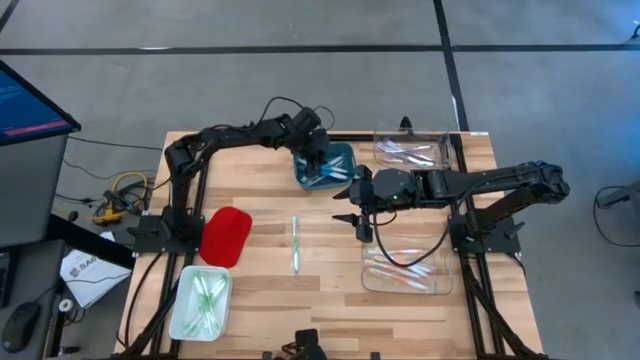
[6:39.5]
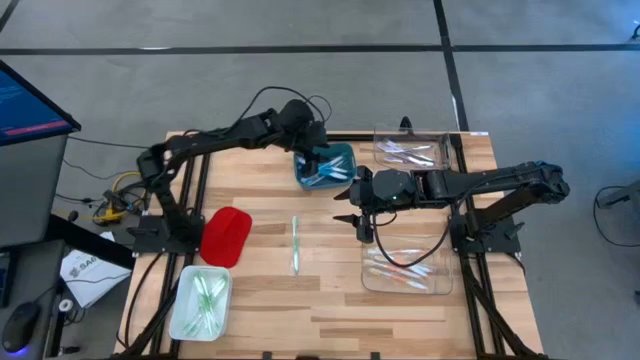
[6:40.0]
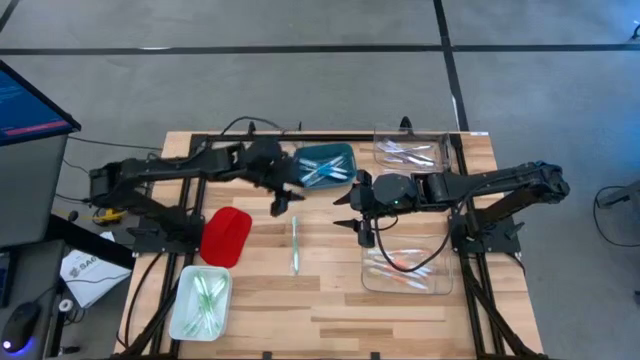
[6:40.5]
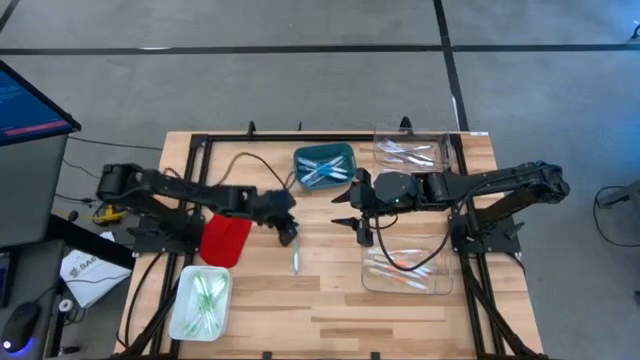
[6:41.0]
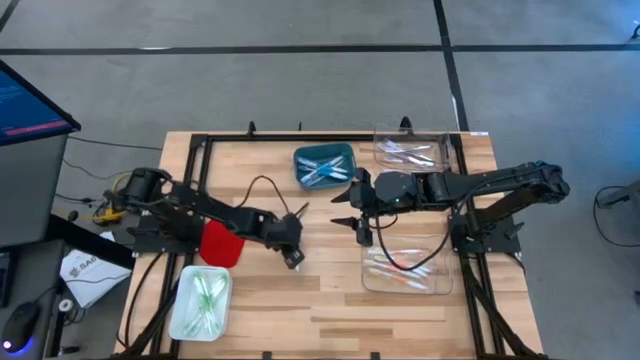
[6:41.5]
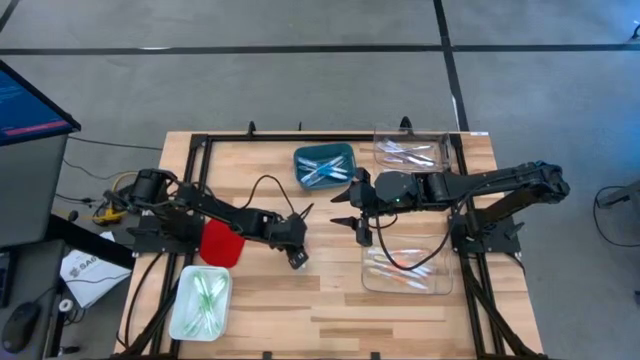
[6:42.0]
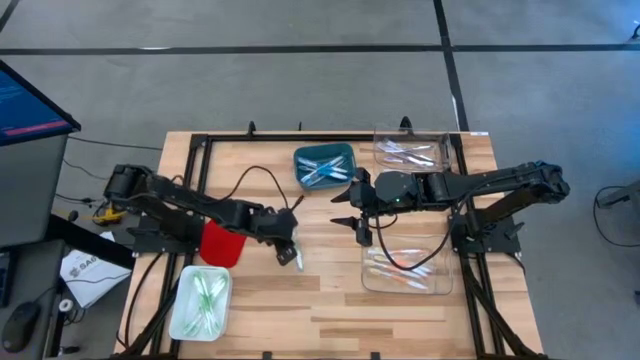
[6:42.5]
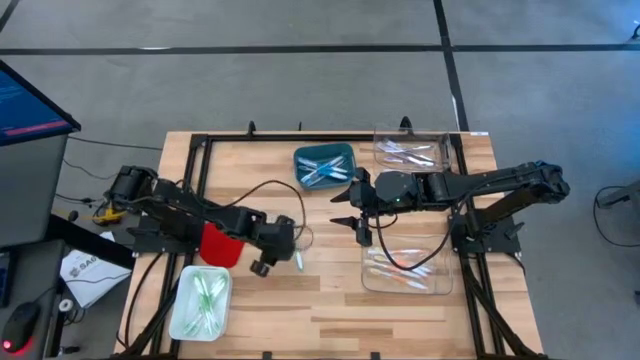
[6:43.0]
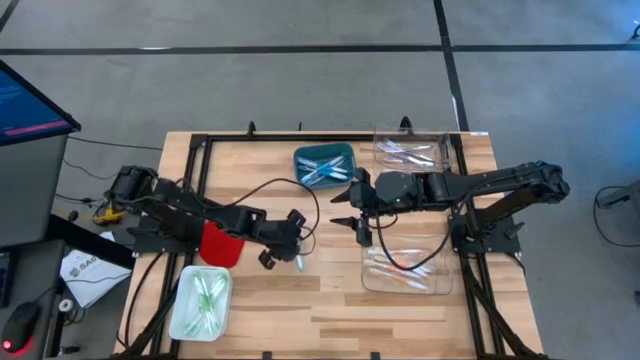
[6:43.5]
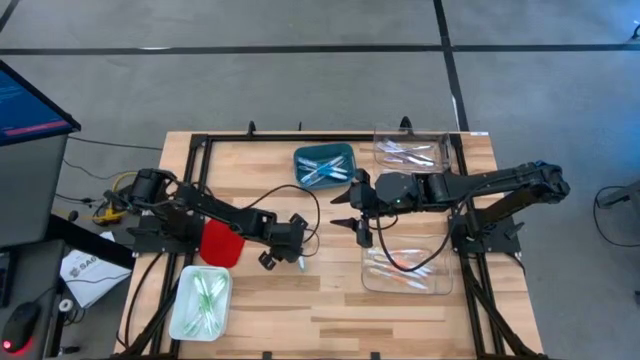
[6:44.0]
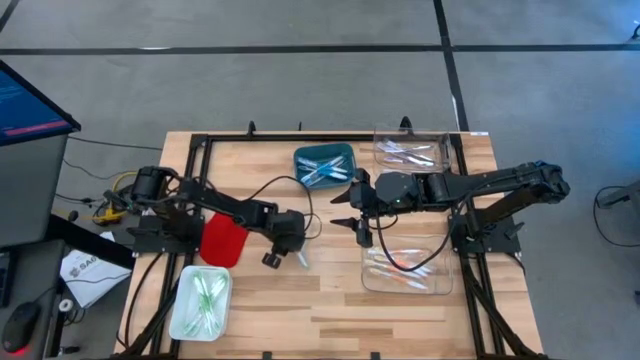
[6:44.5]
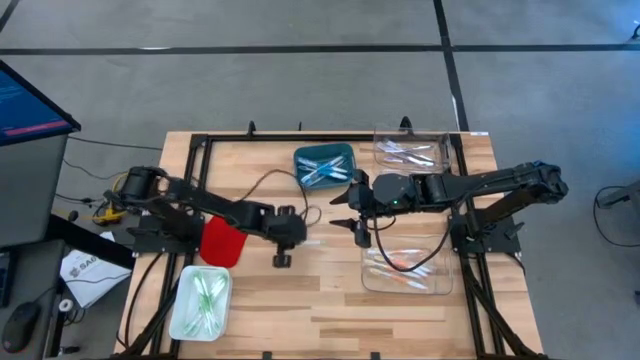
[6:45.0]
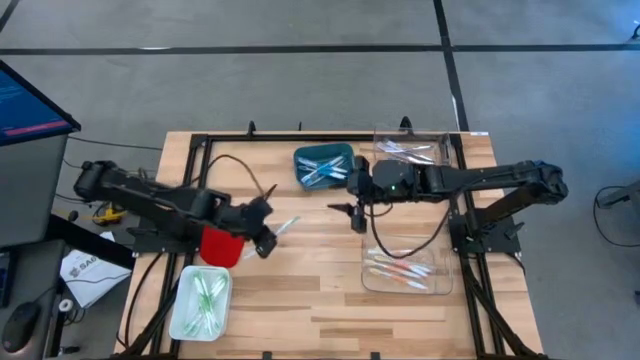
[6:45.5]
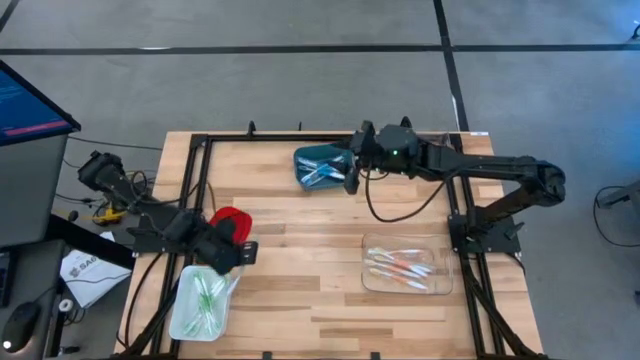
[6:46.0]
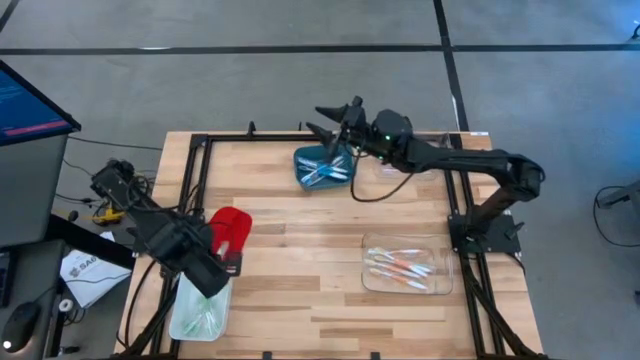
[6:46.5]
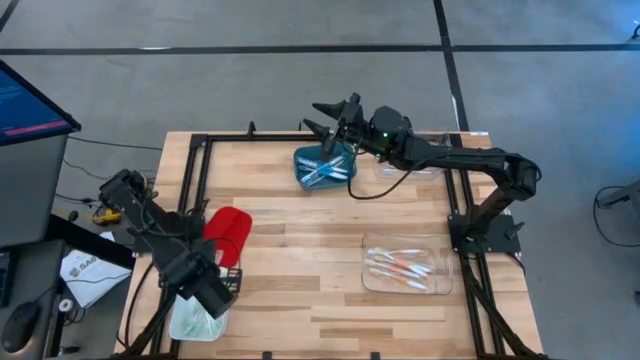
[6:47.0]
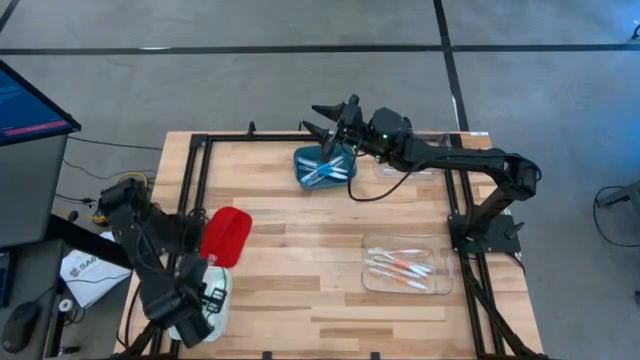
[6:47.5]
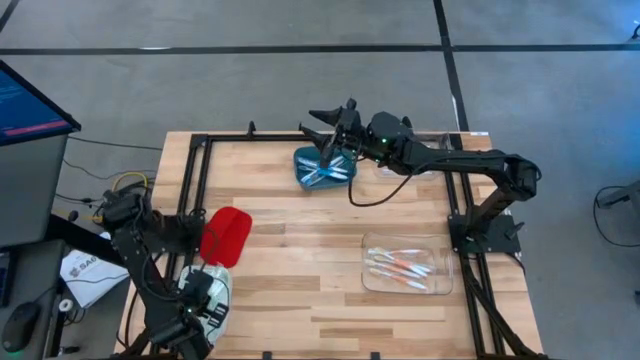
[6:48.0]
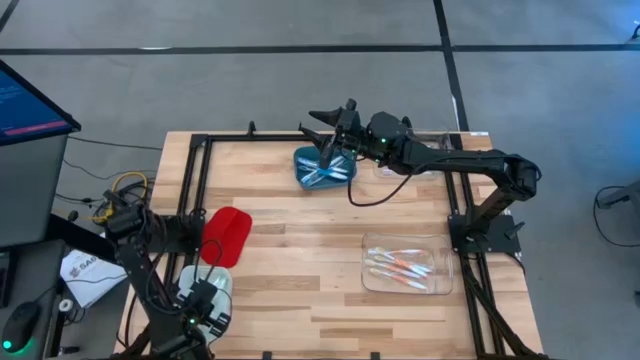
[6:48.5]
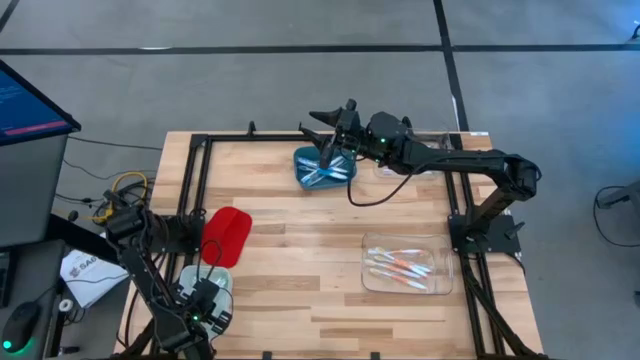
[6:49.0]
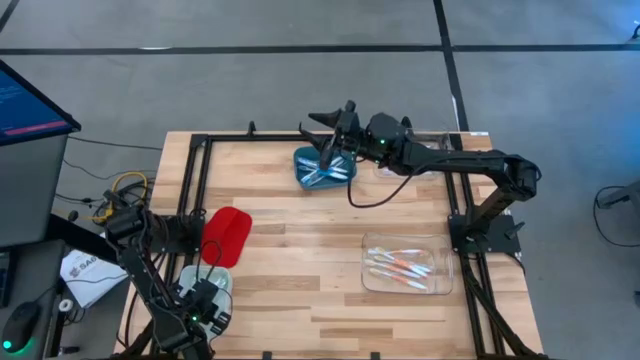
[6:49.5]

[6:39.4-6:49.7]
Task: Pick & Place Toothbrushes
Put the green toothbrush into the white bin

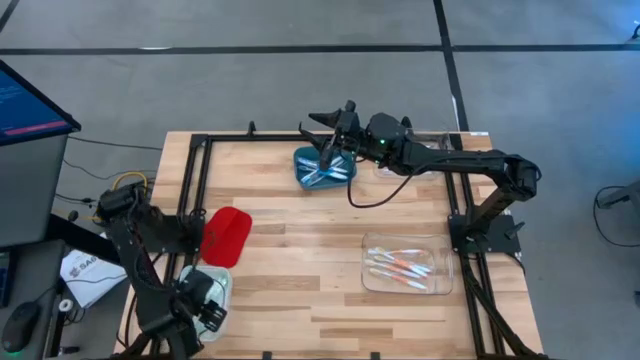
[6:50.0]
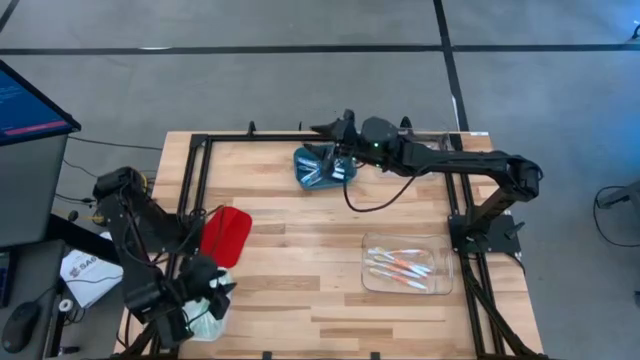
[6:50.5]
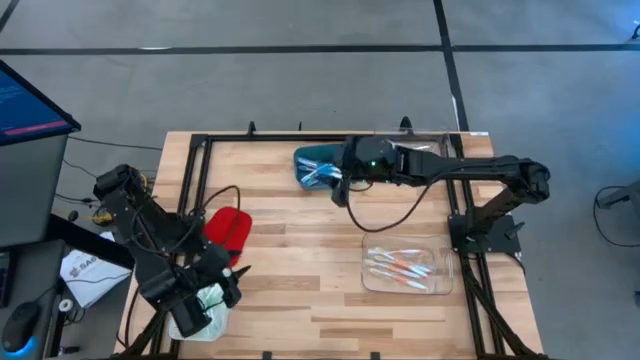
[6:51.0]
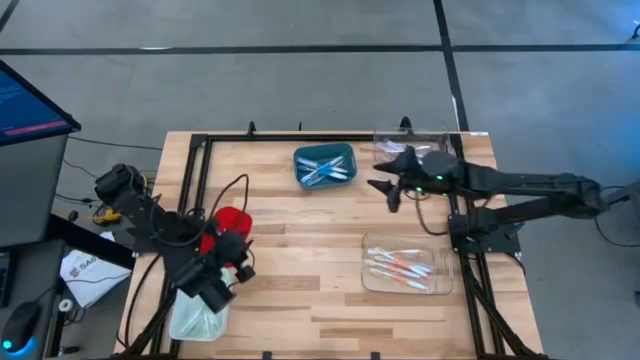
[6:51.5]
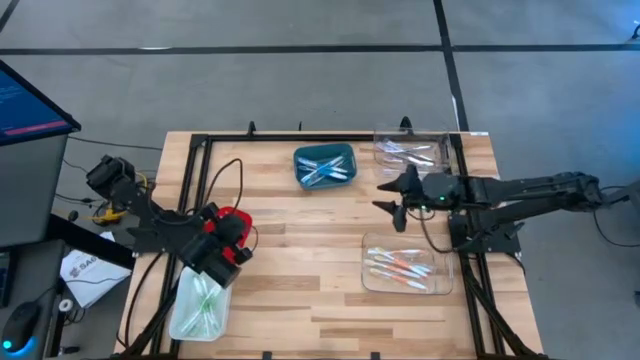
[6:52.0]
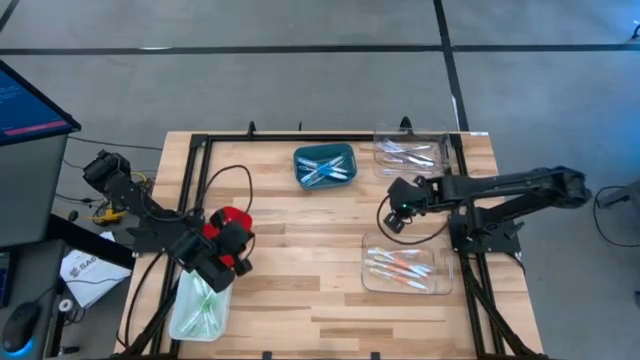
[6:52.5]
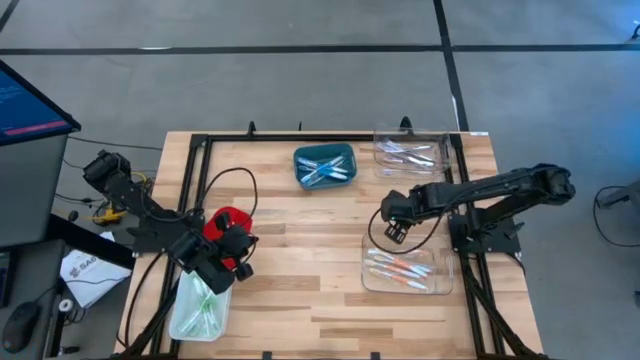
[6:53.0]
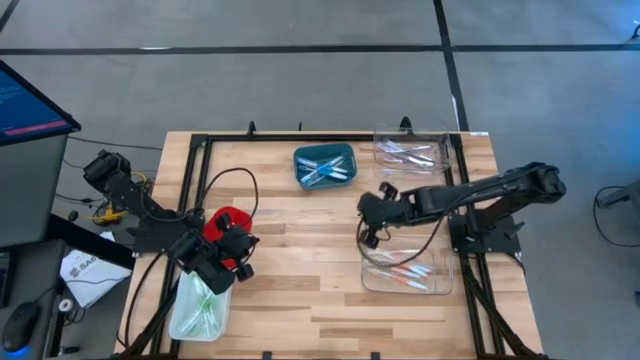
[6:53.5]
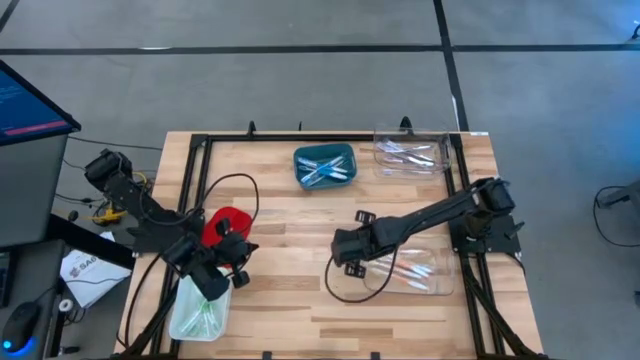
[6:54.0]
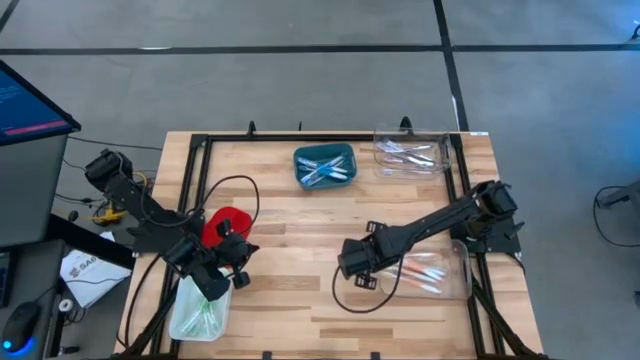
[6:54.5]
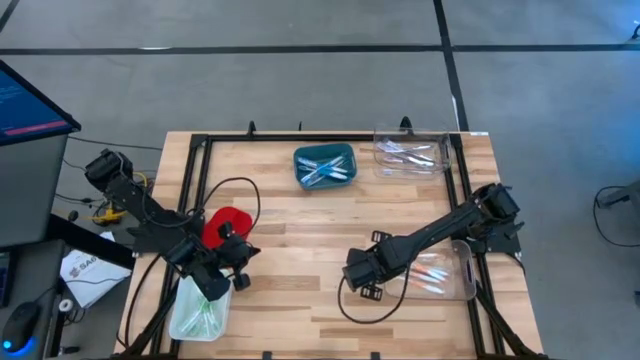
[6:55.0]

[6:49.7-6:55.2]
Adjust the bottom transparent bin on the table

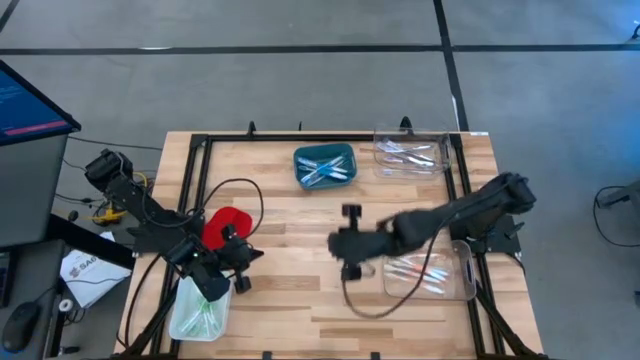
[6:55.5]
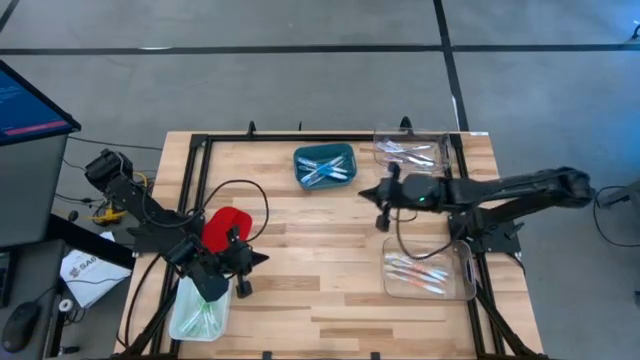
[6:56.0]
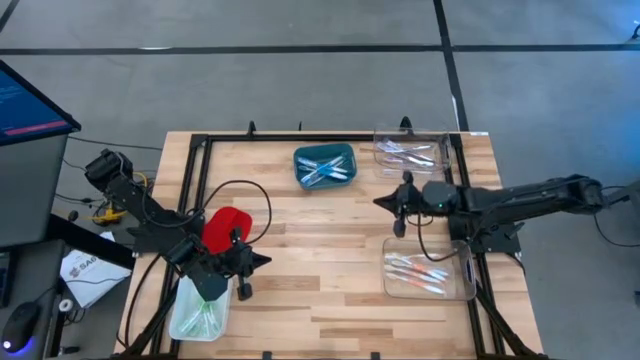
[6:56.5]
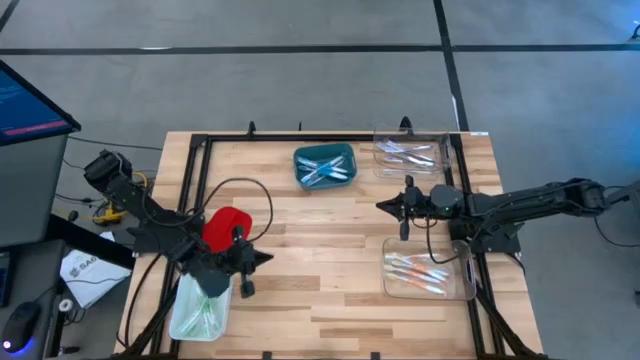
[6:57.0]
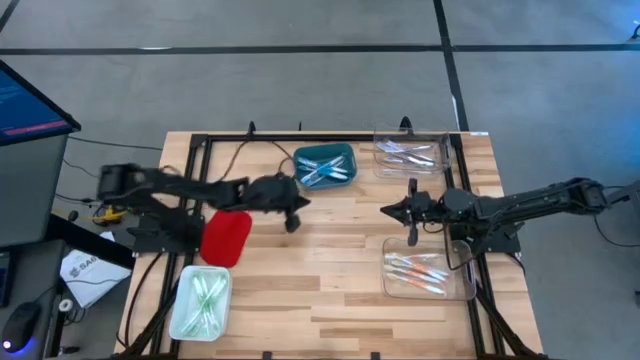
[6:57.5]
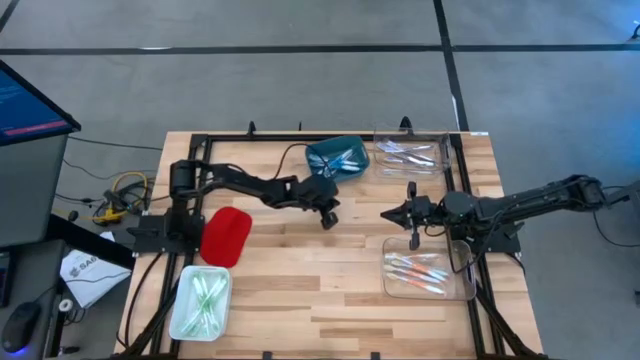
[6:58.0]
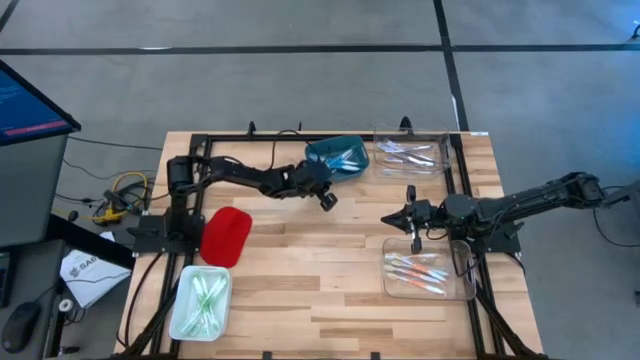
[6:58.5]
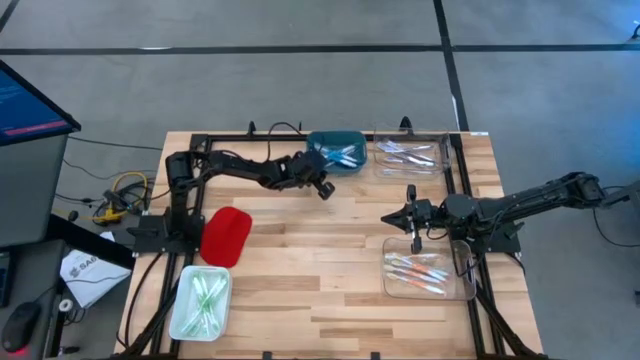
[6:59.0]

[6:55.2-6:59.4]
Adjust the blue bin on the table

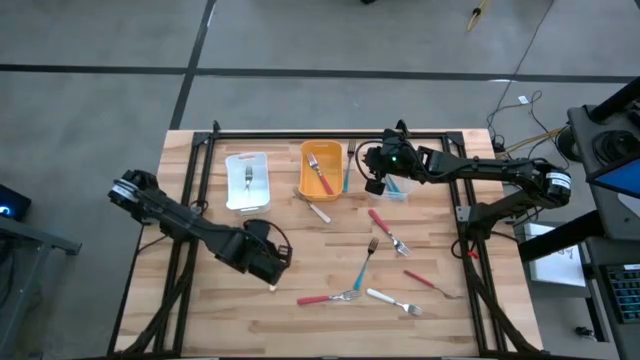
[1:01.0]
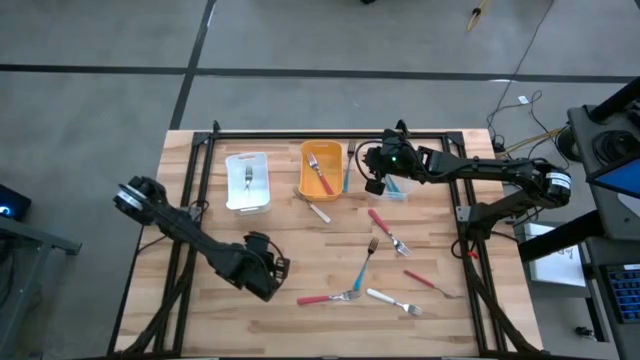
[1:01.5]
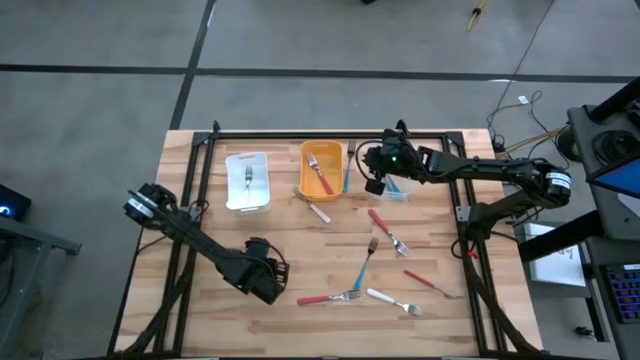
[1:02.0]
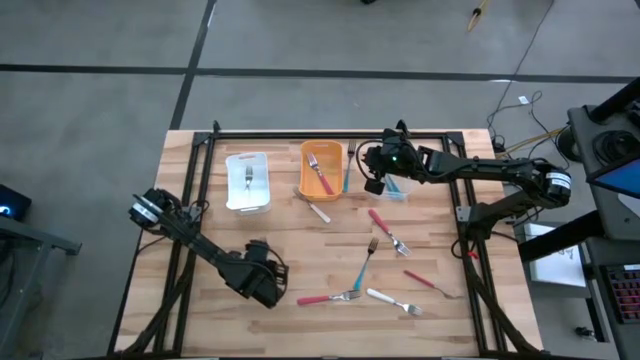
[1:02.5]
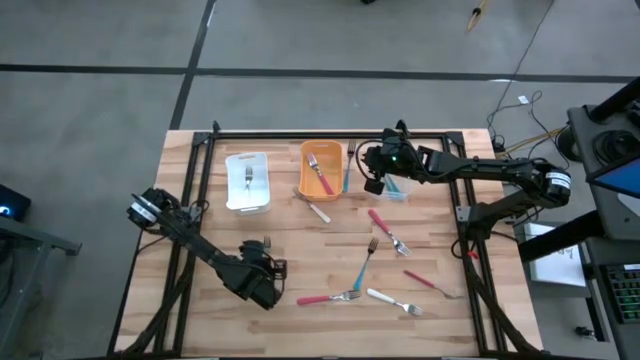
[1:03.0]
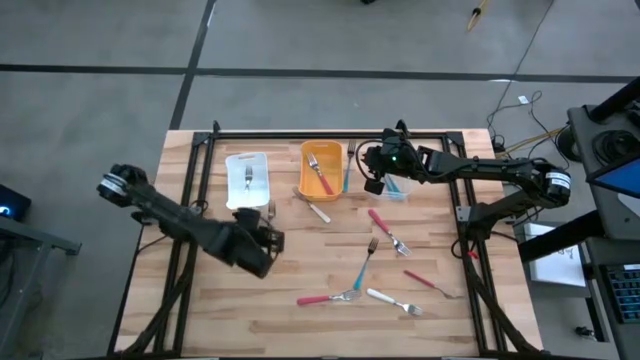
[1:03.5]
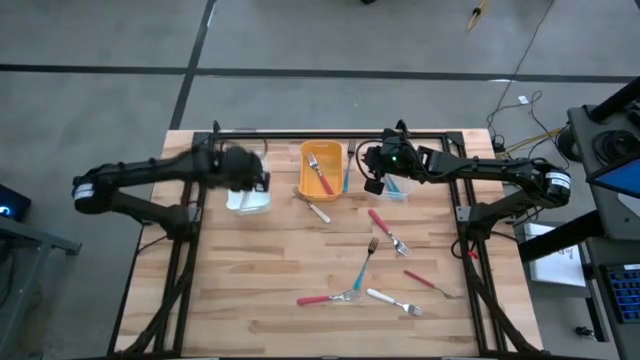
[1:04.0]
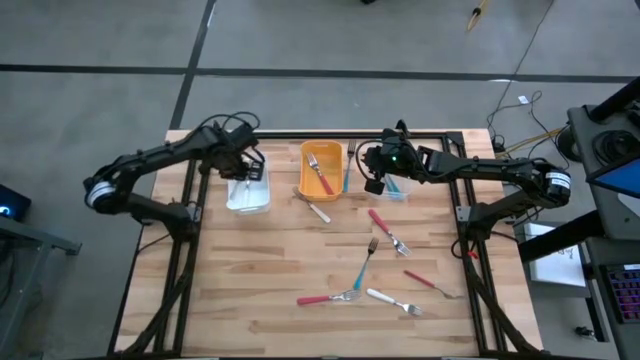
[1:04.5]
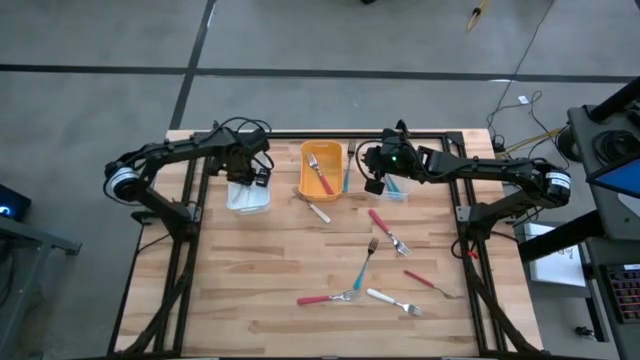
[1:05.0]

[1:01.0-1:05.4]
Task: Sort silverware by color (type)
Put the white fork into the white bin
